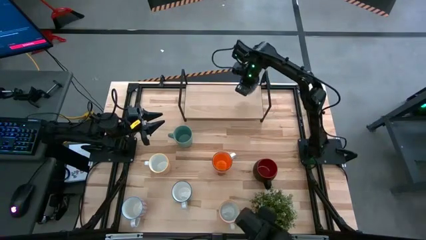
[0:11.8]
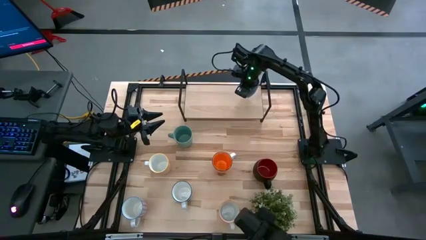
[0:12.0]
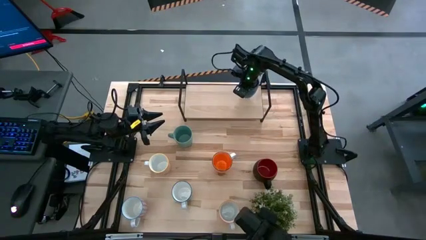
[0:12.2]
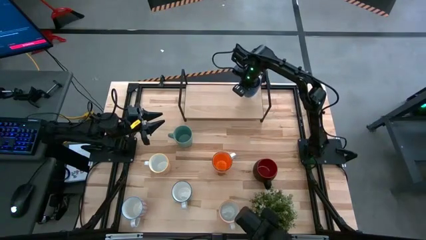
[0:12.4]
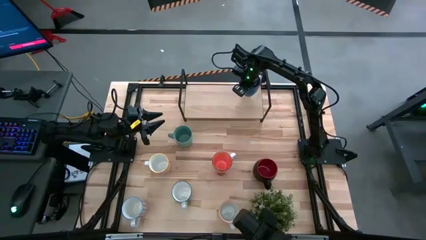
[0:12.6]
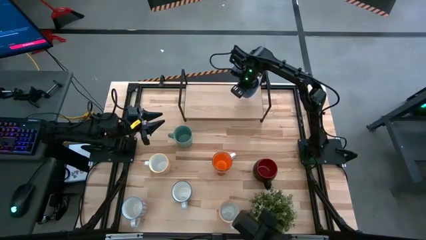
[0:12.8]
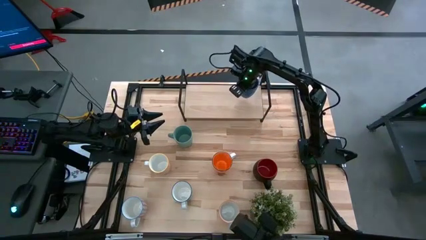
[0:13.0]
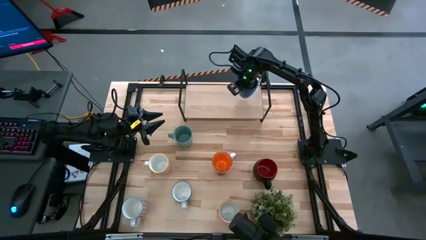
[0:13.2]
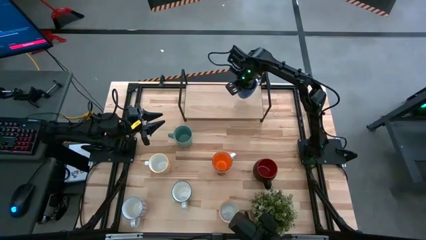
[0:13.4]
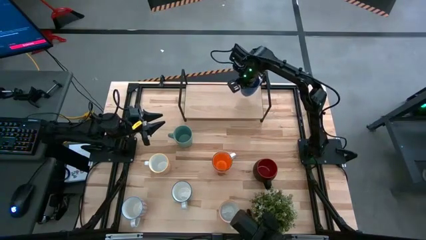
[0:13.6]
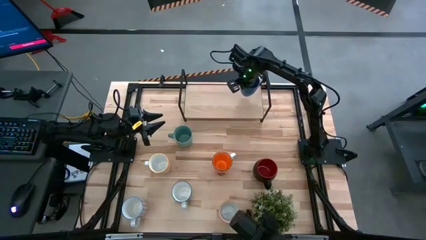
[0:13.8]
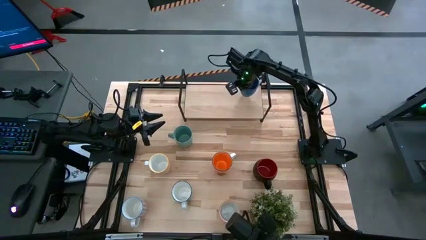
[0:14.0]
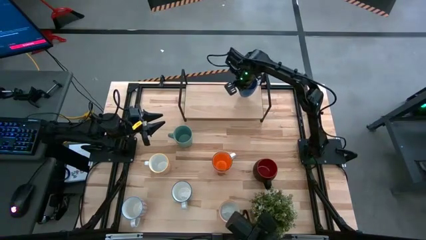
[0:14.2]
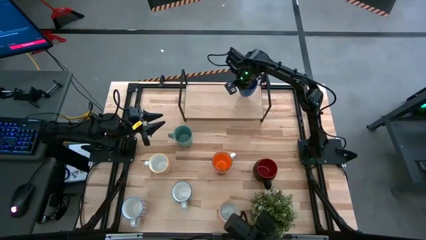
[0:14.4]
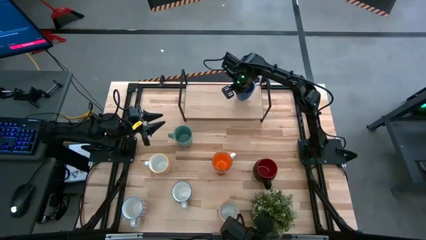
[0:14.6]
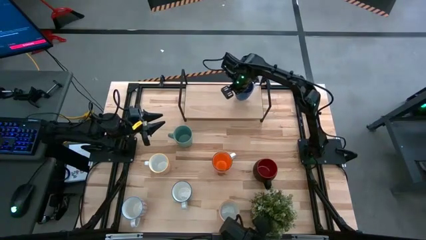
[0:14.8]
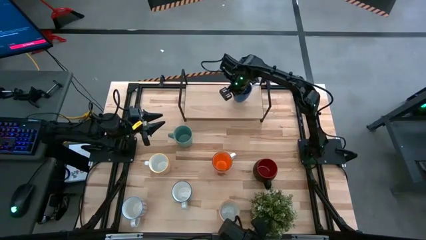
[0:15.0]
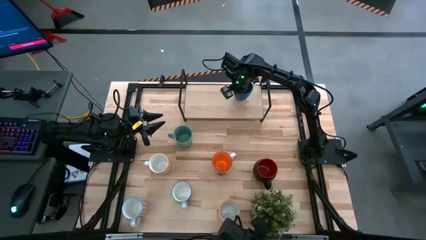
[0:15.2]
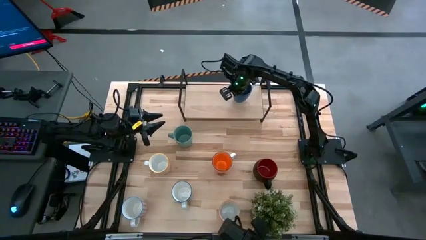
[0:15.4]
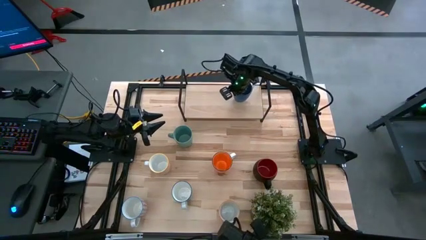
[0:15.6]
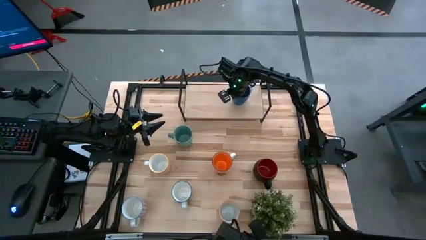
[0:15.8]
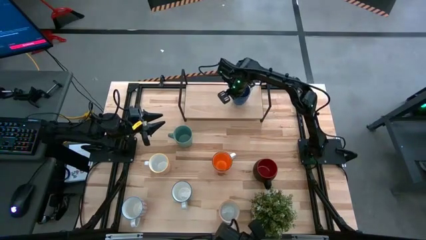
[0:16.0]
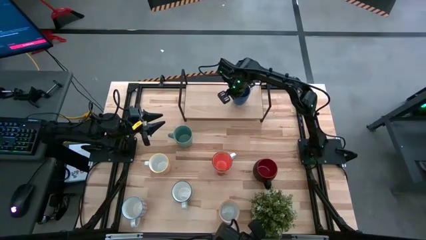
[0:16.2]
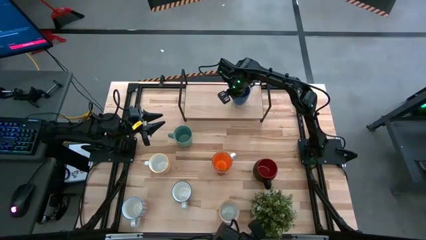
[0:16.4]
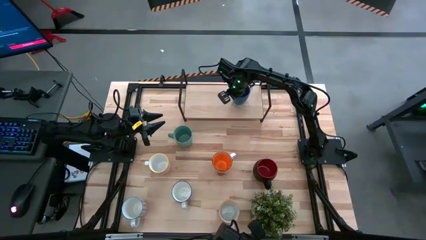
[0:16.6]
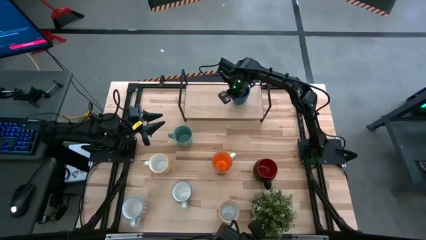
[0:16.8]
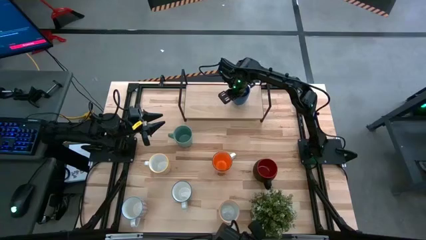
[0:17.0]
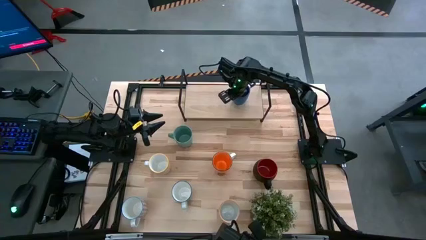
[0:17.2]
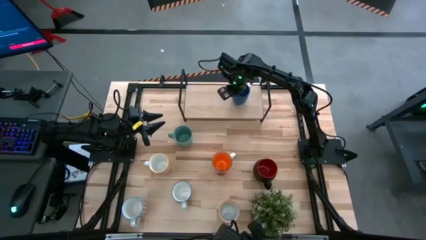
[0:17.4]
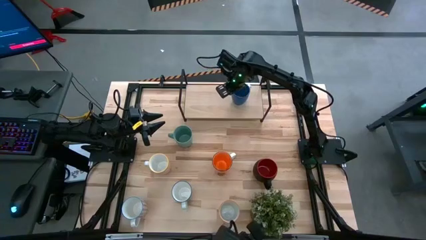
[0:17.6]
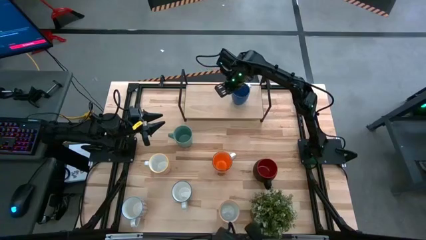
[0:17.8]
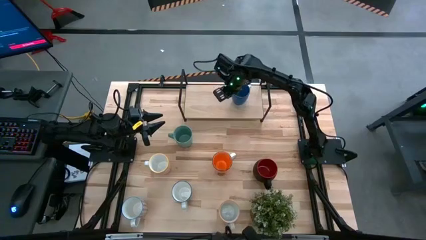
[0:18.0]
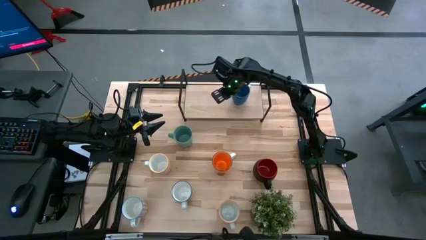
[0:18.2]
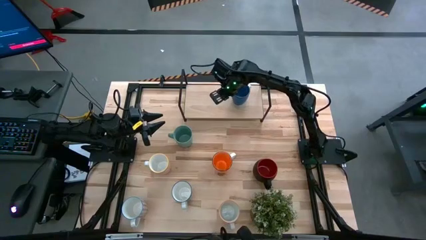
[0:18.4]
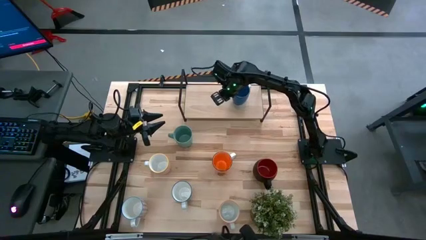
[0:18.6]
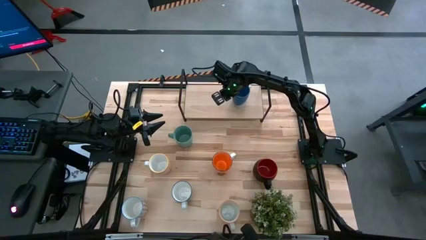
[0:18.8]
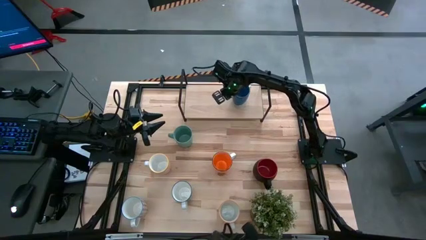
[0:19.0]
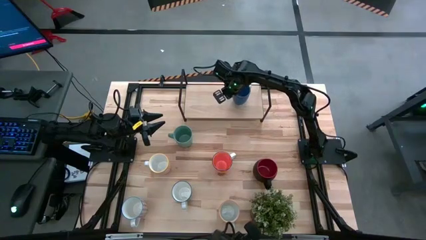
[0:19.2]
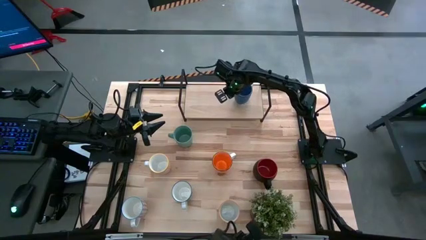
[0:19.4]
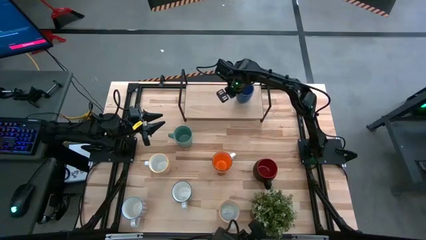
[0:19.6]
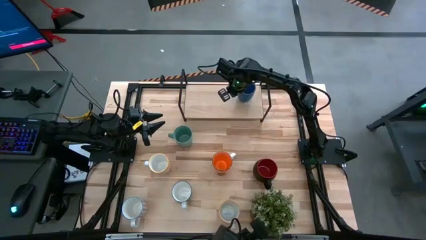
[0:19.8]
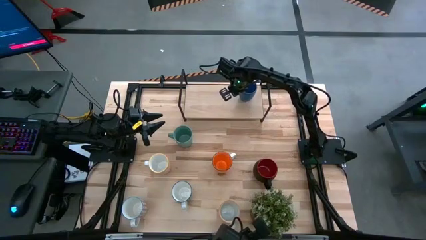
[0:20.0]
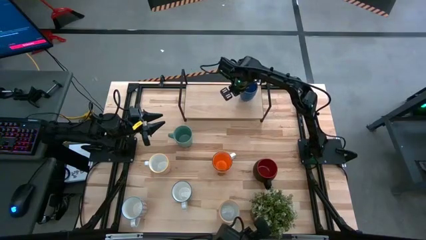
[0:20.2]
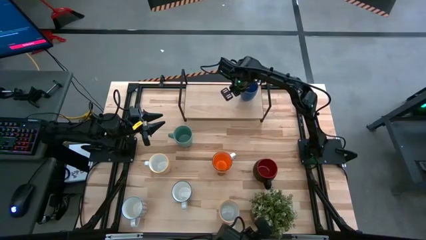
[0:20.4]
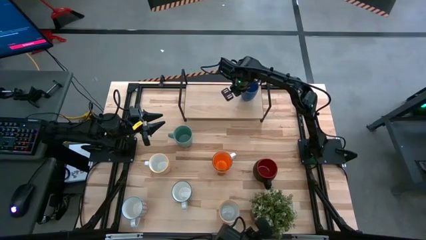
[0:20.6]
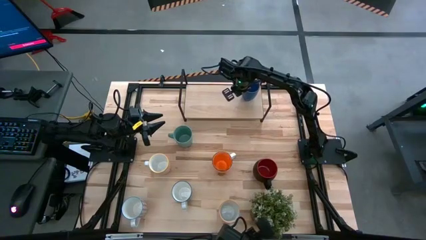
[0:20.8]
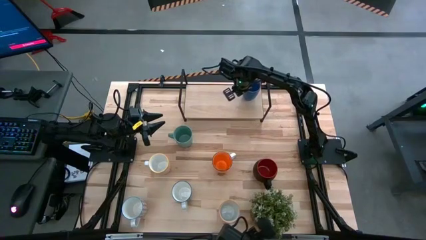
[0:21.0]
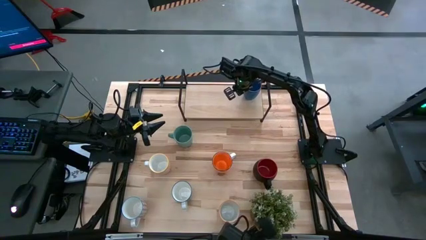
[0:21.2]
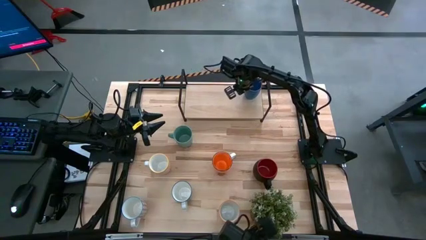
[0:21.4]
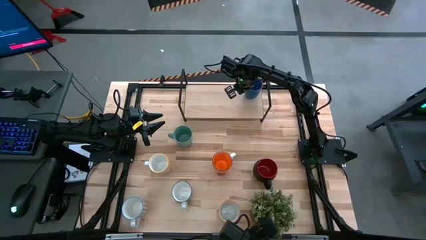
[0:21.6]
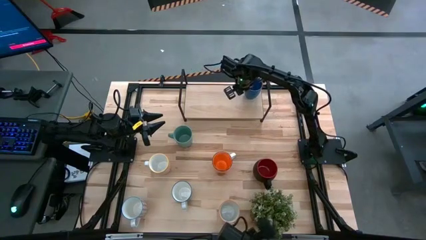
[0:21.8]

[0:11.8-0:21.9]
Task: Place coffee mugs
Put the blue mug on the shelf

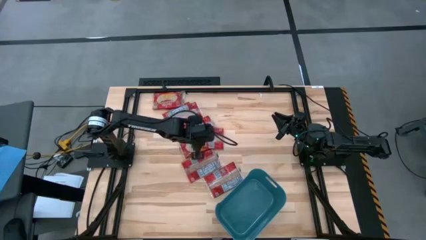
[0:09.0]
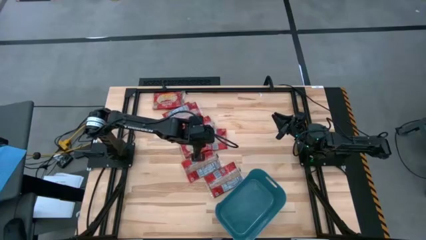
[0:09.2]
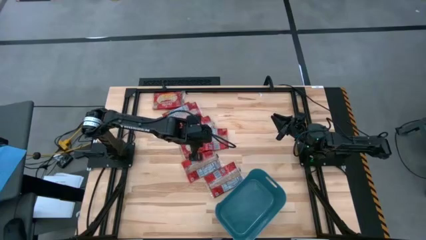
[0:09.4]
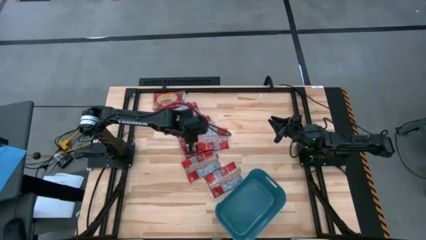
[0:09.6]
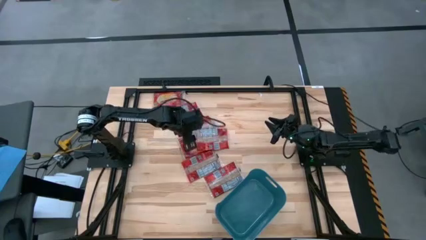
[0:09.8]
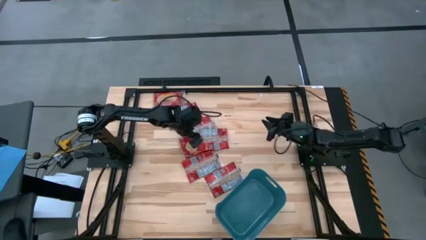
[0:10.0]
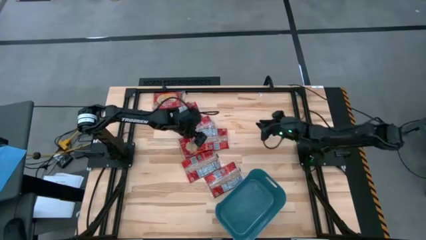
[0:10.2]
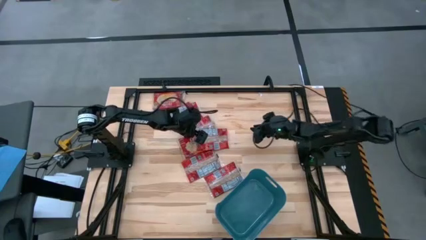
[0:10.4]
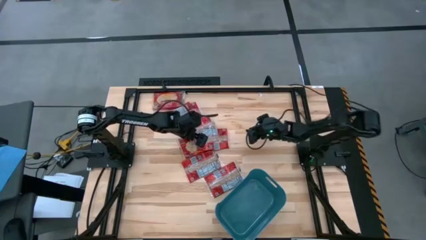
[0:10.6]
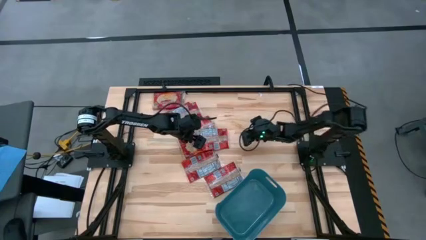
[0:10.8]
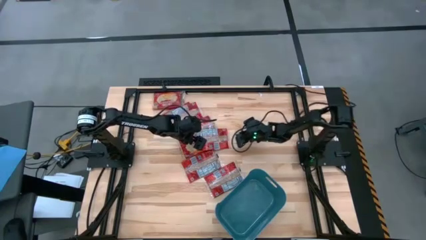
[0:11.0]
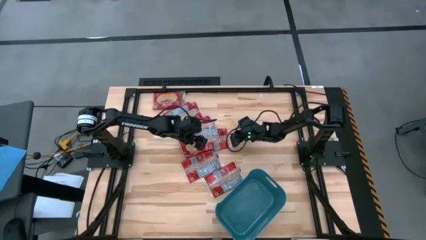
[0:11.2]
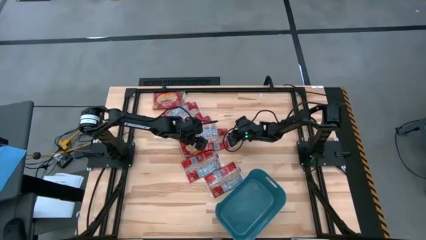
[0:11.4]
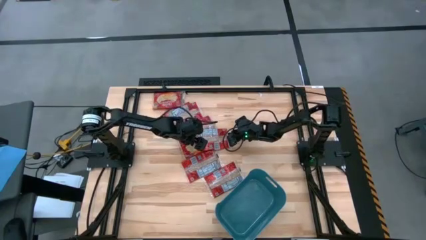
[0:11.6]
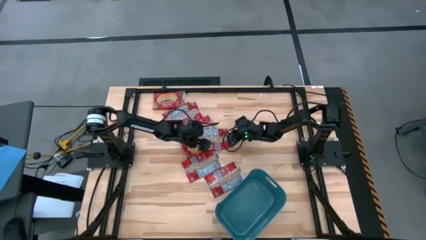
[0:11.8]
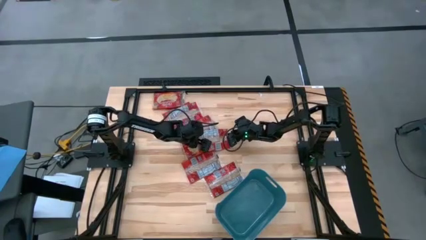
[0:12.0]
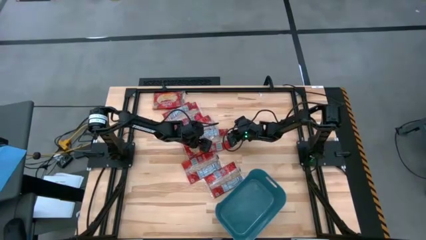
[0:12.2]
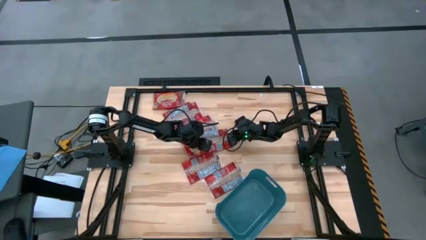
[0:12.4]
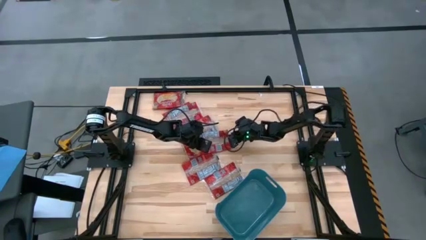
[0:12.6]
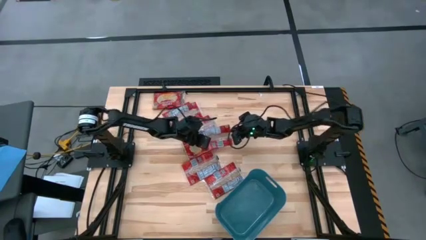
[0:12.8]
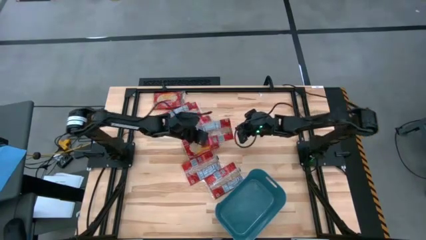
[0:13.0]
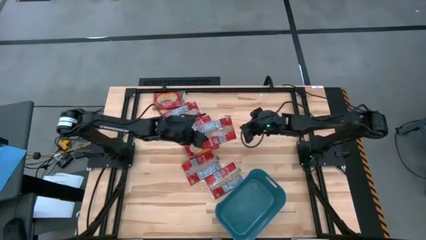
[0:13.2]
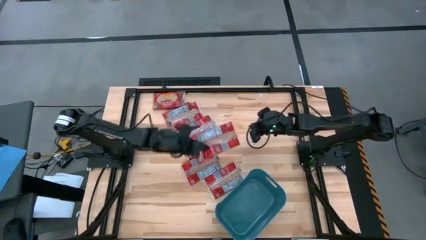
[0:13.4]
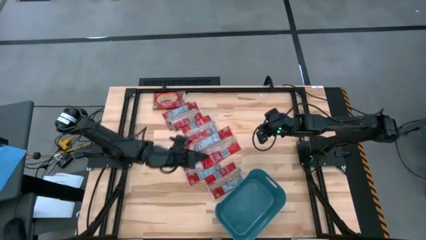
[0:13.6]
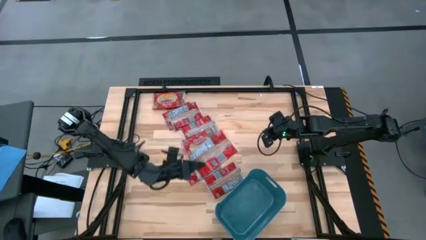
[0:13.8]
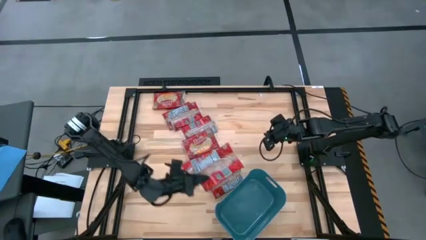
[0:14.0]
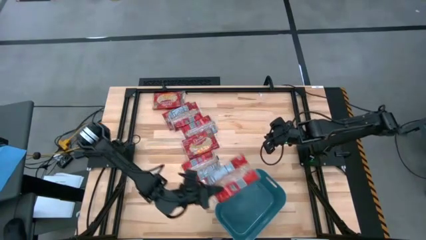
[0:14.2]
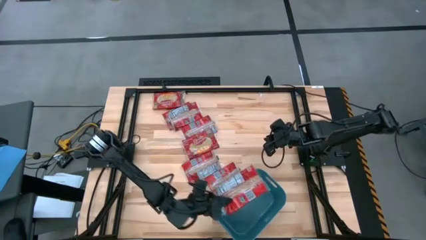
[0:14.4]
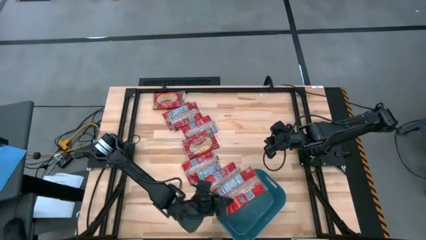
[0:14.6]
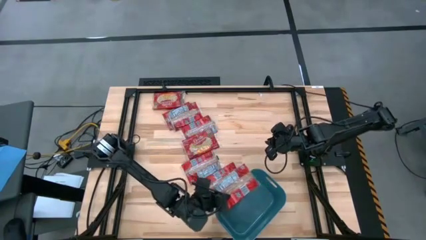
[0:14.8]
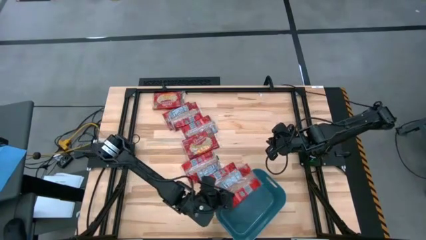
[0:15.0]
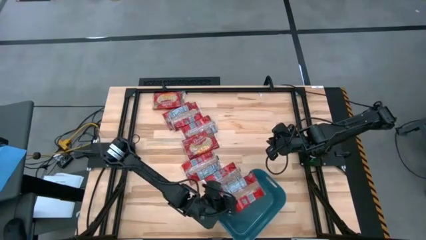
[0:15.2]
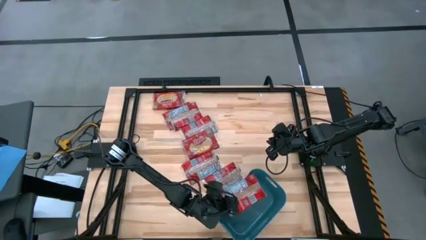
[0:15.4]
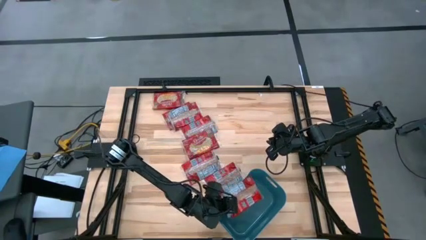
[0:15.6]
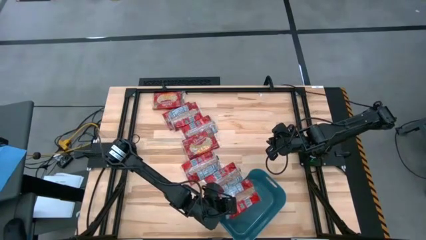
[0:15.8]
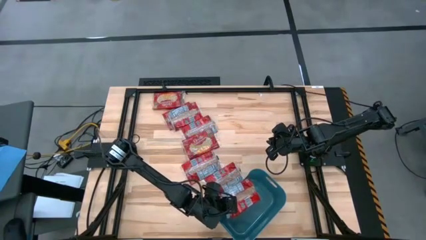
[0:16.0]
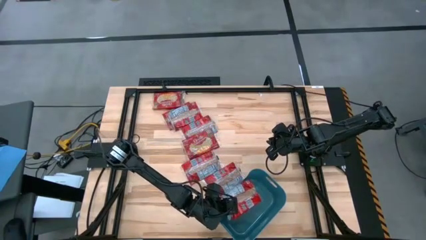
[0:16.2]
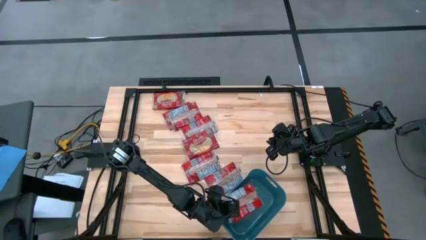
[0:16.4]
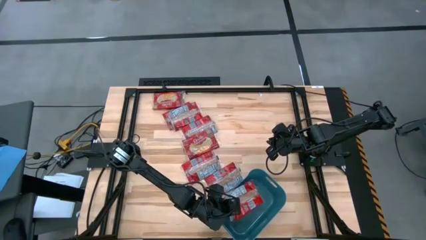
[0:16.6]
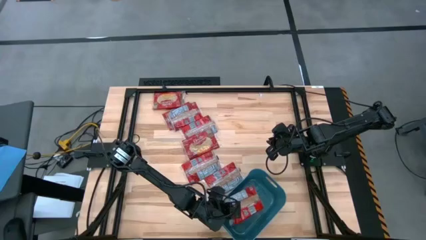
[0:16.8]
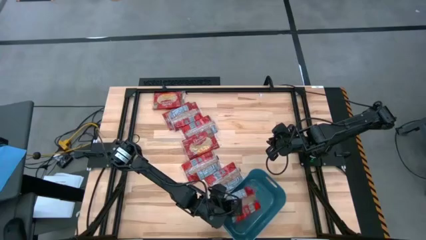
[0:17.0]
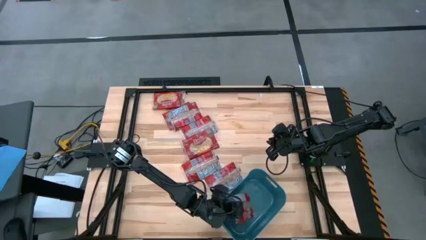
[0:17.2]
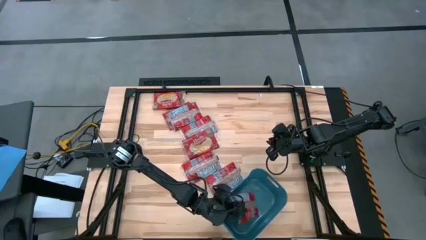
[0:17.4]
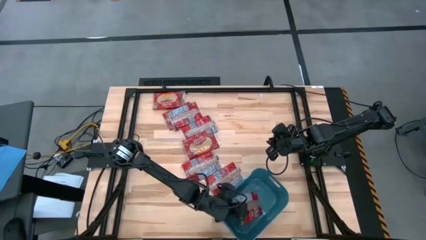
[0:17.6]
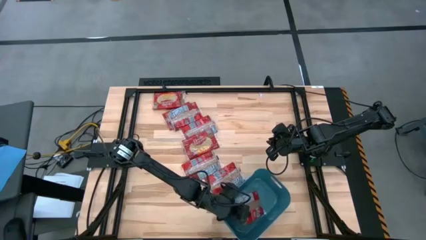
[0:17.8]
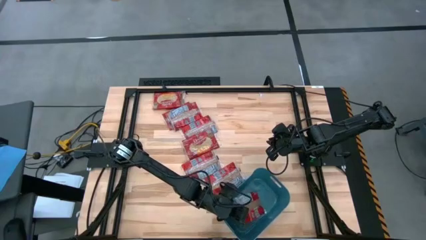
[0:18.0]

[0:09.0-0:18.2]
Task: Sort popcorn bags into baskets
Put the popcorn bag into the blue container
